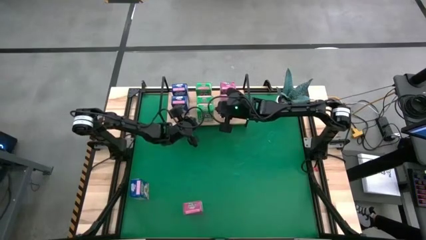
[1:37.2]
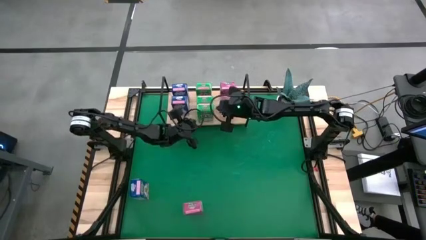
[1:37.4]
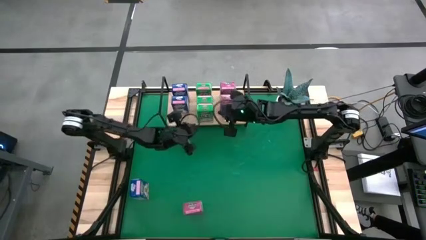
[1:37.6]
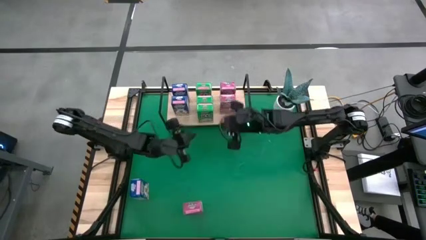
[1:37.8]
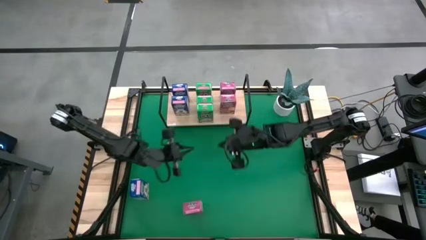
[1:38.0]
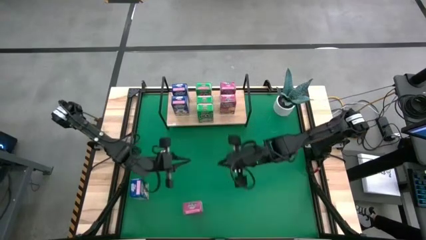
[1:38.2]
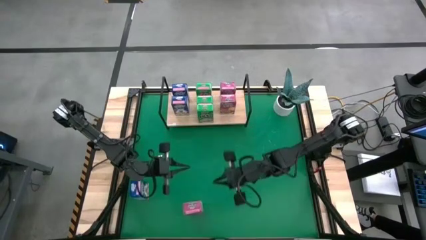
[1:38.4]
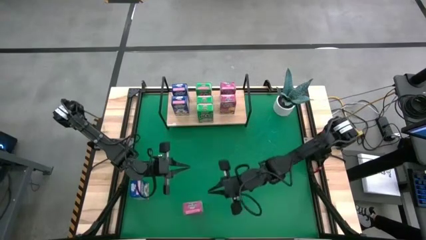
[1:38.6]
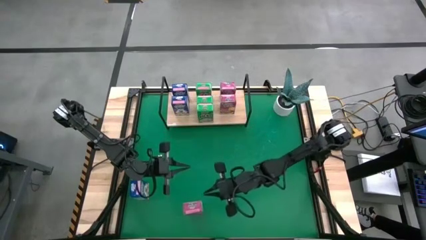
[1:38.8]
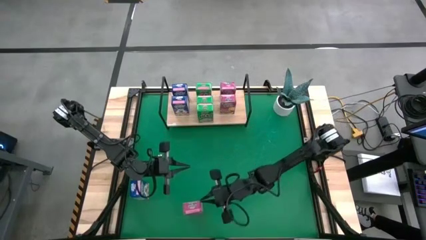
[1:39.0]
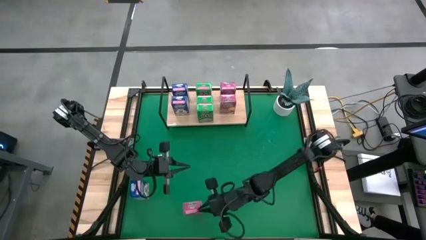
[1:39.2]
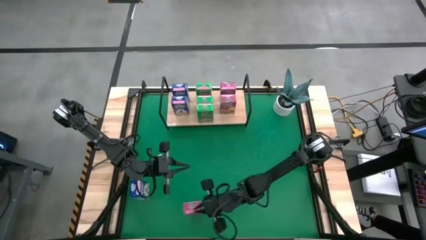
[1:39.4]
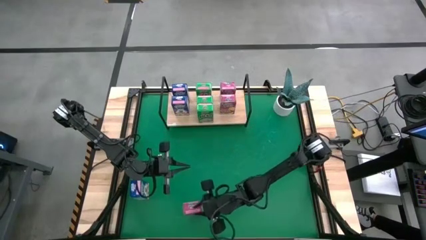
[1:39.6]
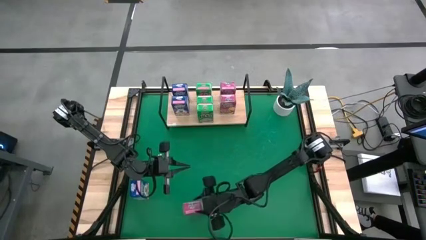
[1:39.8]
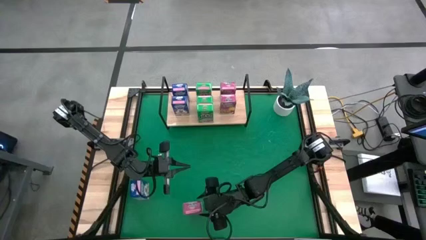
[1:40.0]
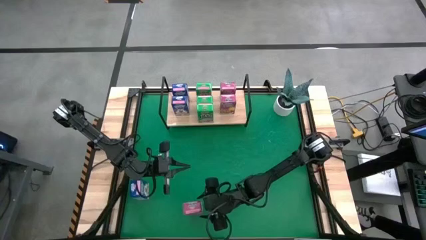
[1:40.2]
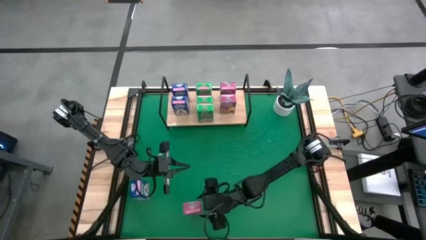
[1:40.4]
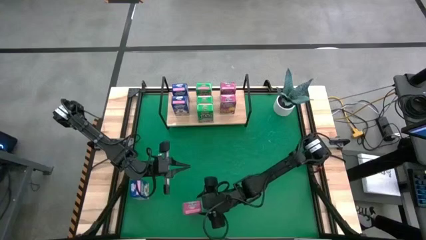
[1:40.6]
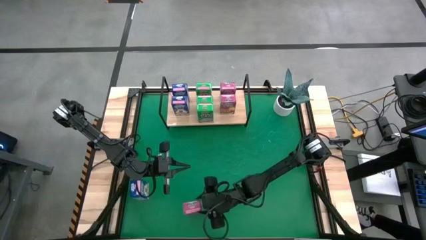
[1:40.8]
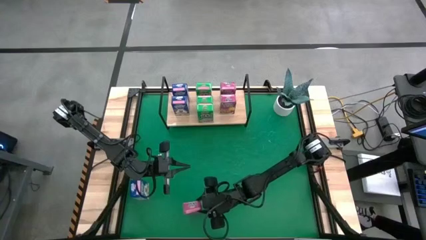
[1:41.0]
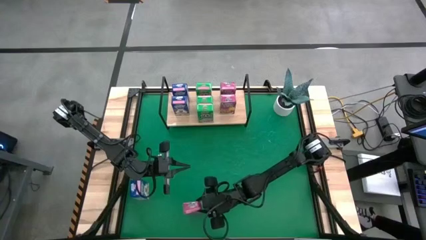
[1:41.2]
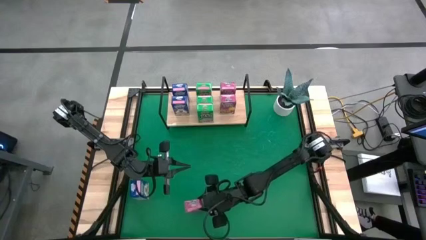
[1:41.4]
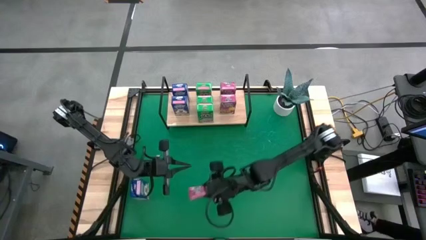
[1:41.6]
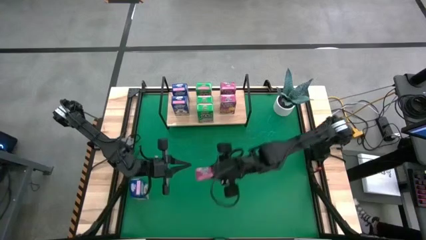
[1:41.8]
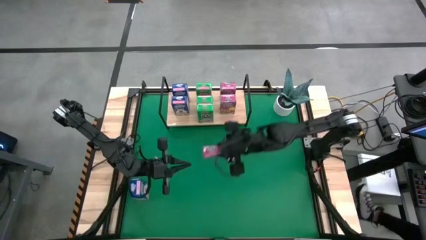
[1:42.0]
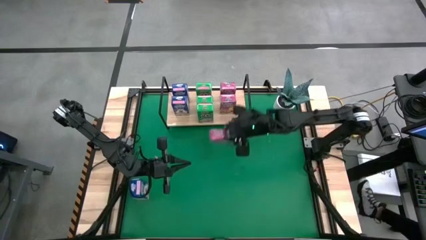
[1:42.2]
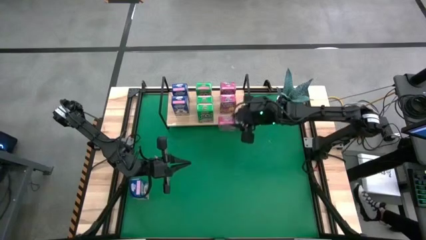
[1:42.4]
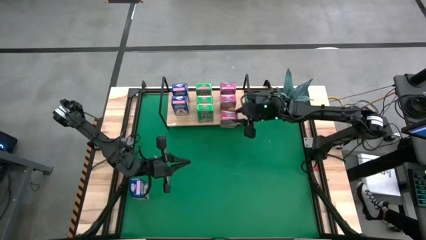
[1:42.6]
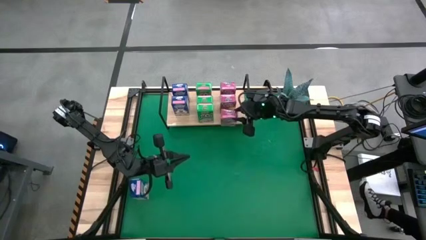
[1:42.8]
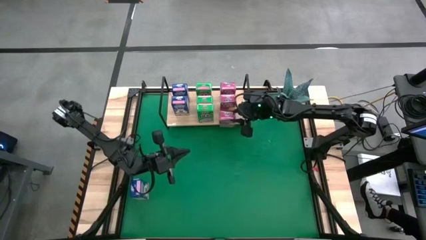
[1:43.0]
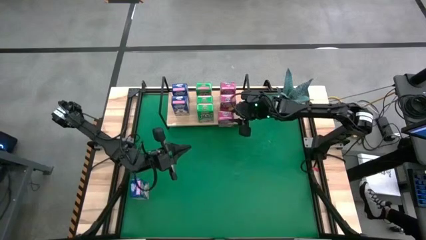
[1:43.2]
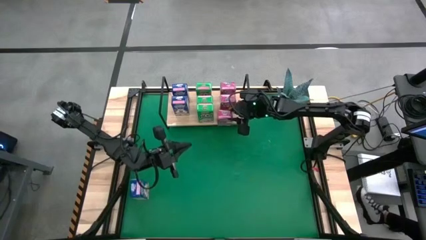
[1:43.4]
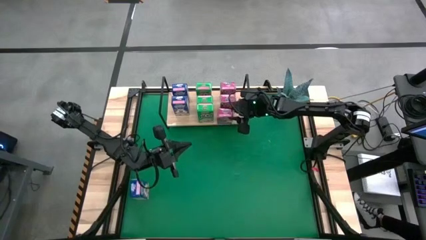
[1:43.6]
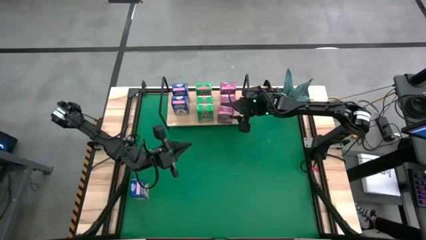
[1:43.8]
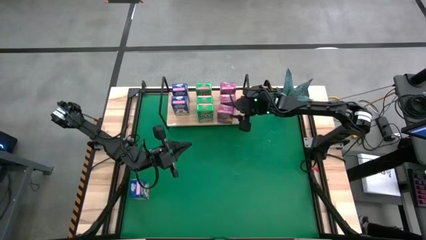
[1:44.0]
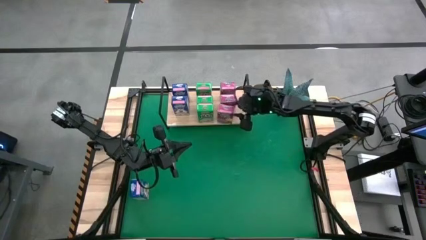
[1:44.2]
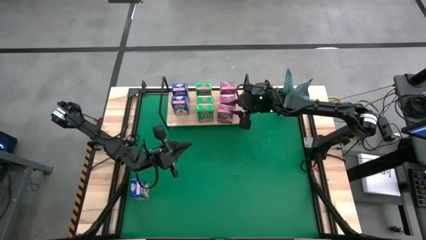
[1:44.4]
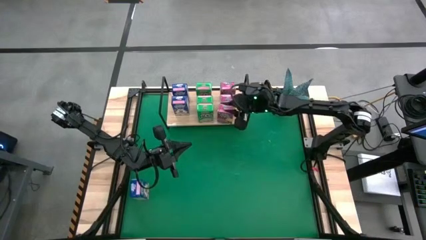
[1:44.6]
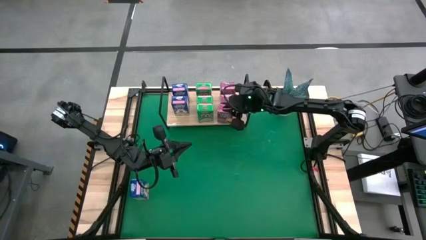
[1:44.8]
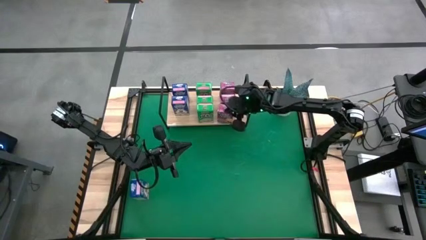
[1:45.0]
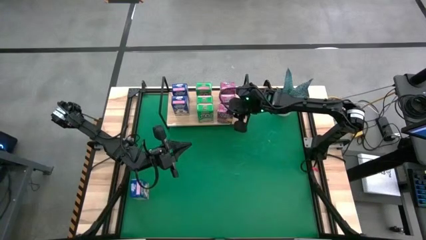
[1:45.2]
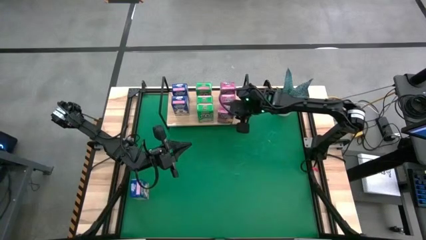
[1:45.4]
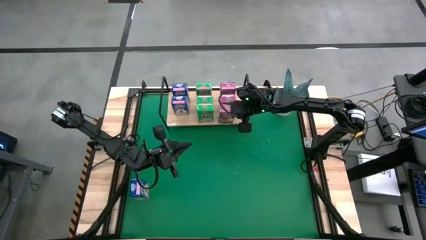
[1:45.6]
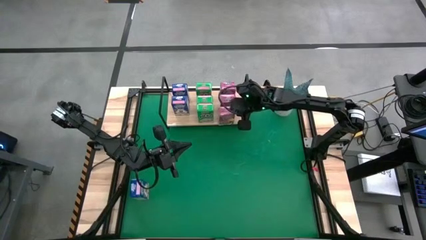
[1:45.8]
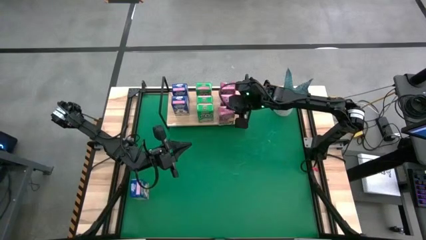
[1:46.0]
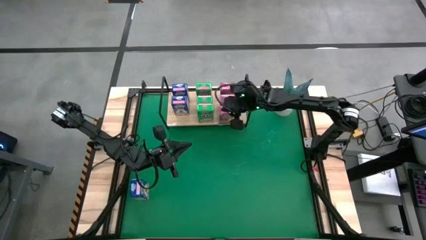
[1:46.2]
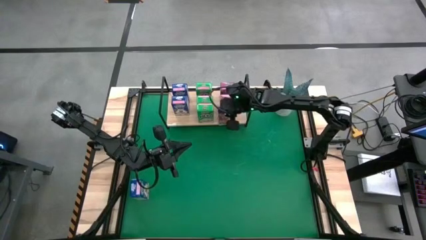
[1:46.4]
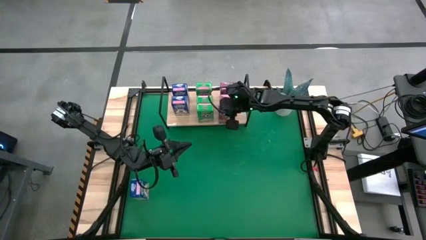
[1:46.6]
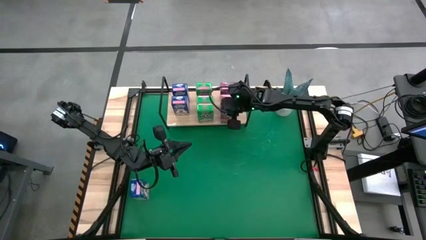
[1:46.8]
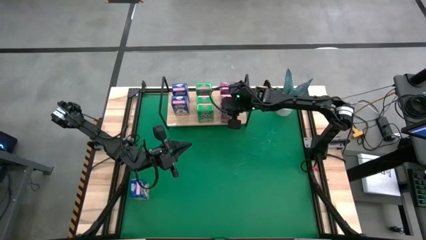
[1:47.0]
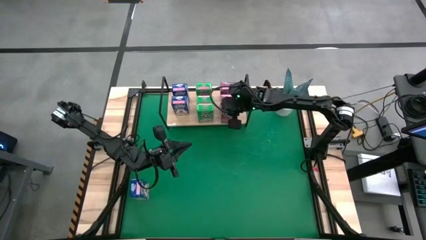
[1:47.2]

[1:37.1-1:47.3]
Task: Stack cereal on shelf
Put the pink cereal box aligned with the other pink cereal boxes on the shelf

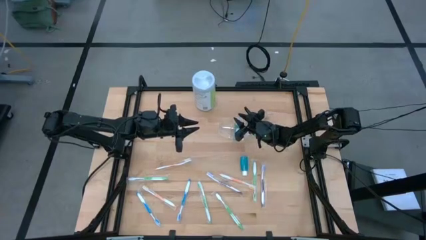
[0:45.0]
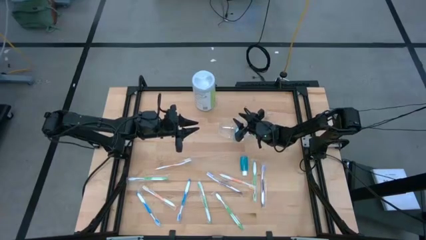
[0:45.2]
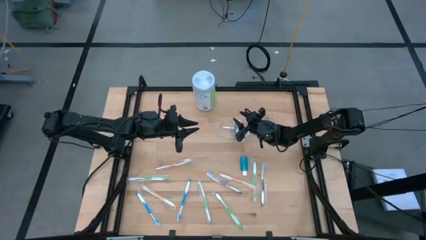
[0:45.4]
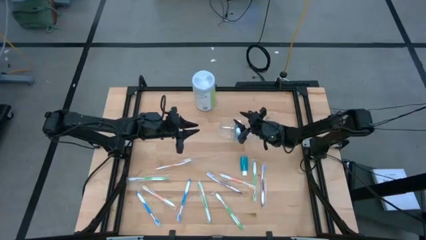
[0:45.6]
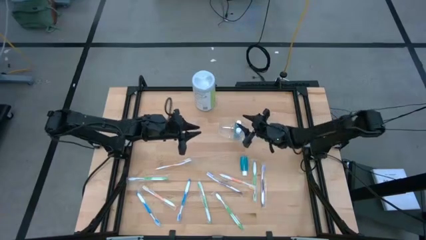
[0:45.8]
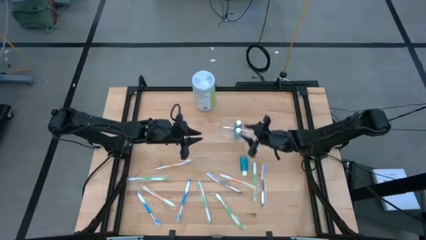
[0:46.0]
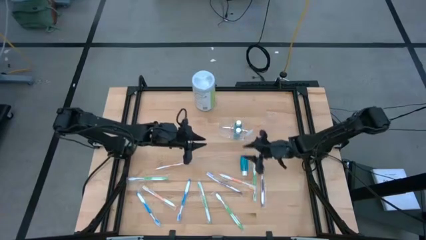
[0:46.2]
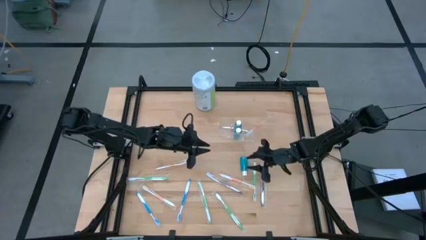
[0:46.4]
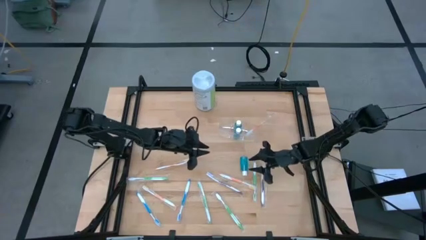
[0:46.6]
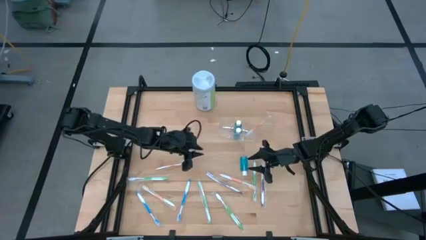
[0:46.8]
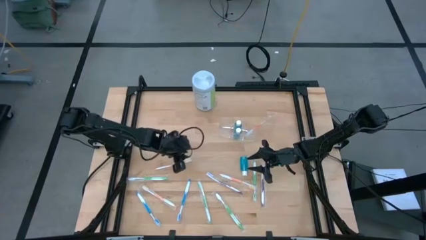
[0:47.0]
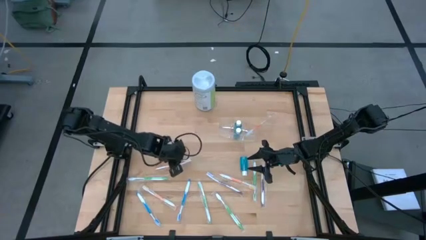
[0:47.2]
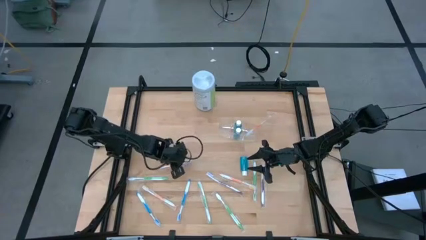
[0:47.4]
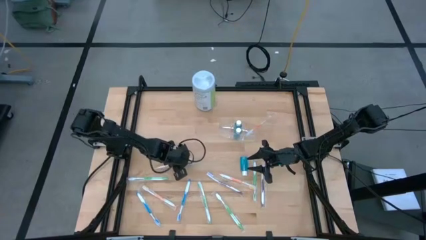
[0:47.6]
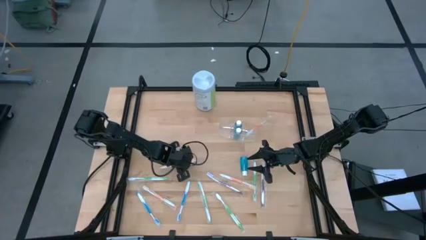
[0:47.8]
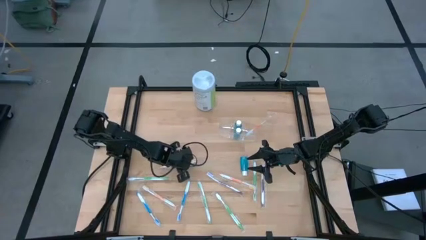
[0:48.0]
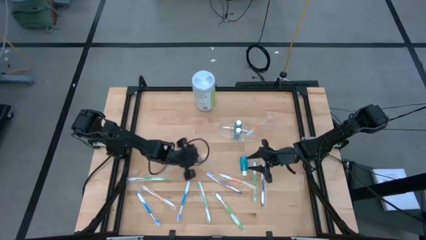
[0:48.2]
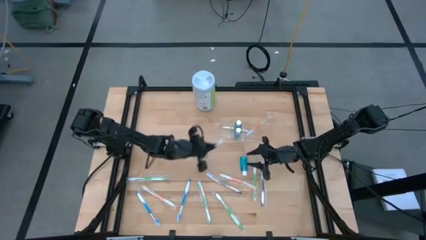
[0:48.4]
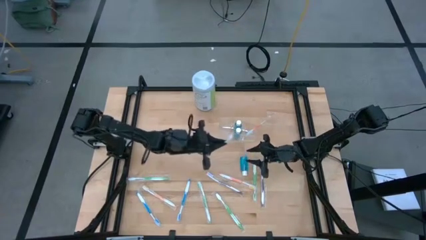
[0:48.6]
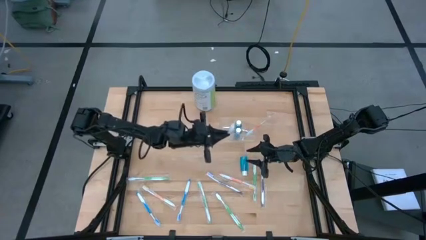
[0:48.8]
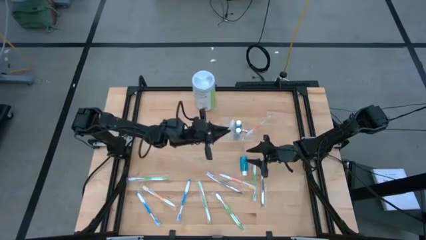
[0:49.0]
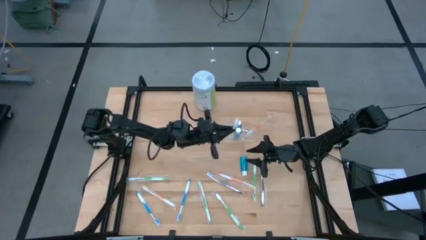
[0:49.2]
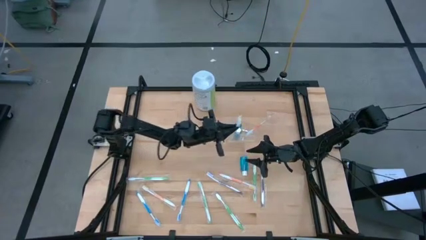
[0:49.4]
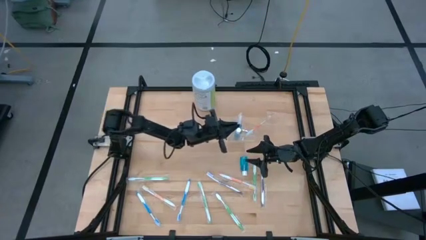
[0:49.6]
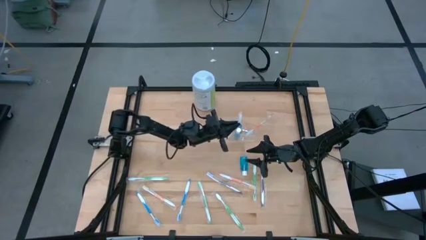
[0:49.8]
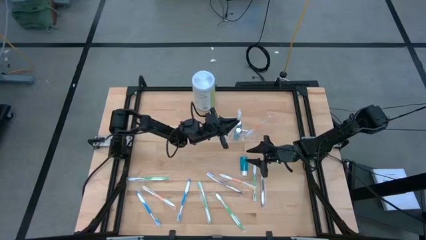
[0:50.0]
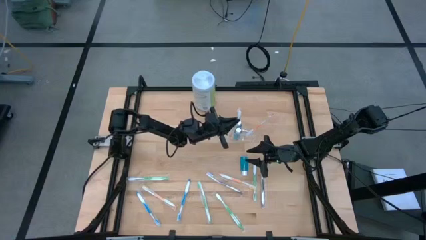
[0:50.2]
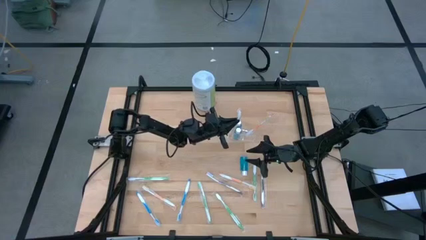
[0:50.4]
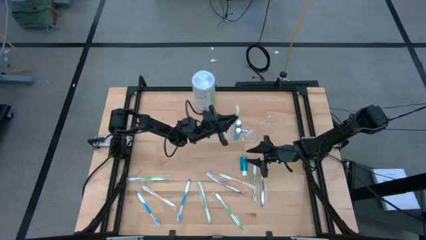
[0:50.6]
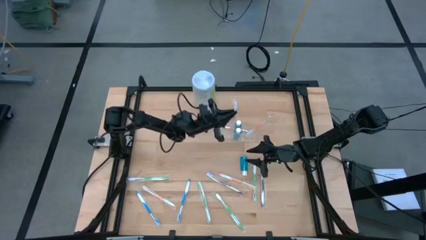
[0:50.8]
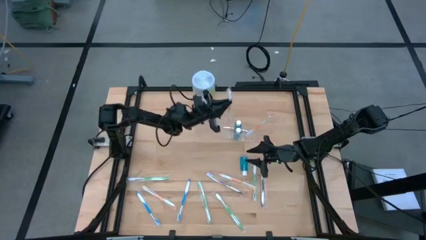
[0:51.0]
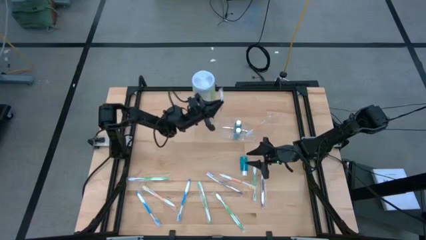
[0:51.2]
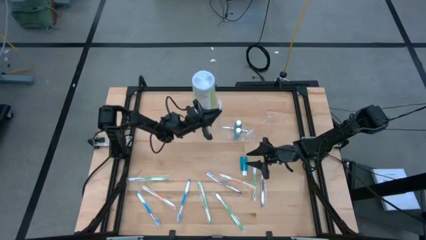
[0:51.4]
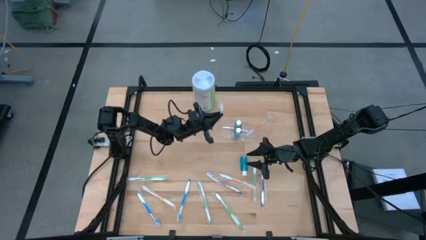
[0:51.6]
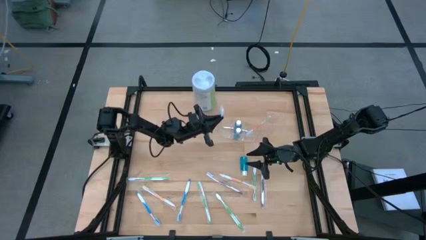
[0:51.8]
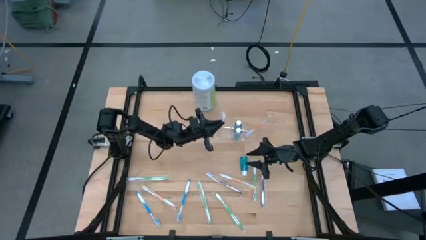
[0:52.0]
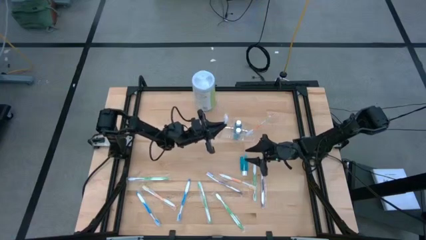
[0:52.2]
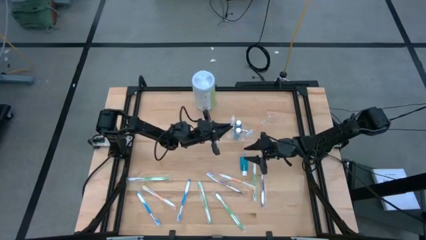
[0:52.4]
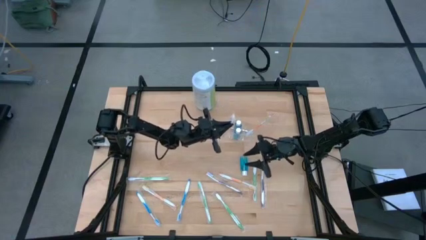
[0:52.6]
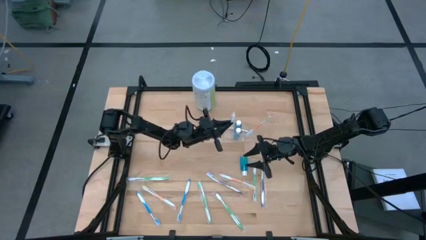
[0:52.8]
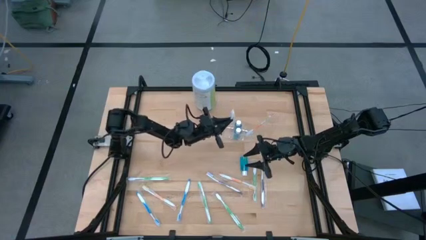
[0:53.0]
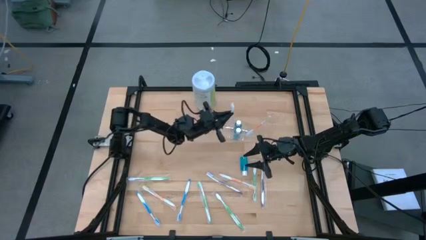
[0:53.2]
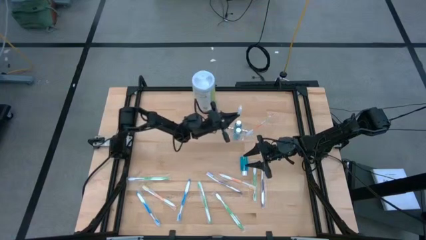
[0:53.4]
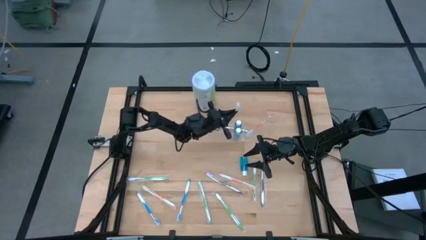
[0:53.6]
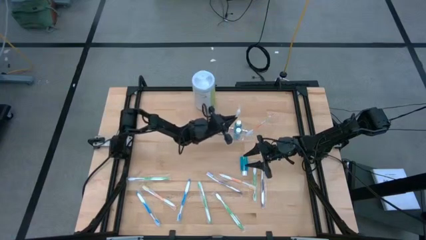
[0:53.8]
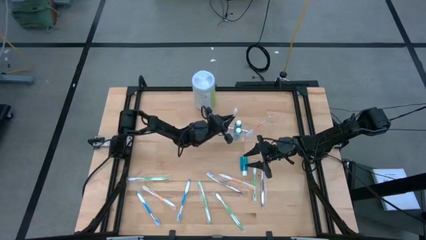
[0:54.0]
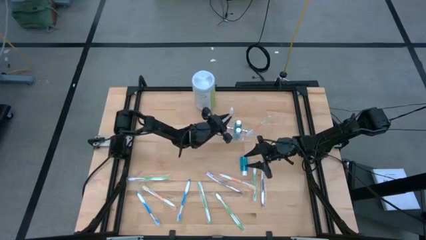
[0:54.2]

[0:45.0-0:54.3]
Task: Pick & Place toothbrushing station
Put the orange toothbrush into the transparent organizer
